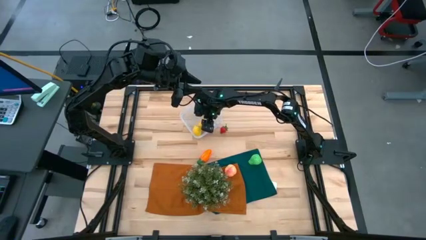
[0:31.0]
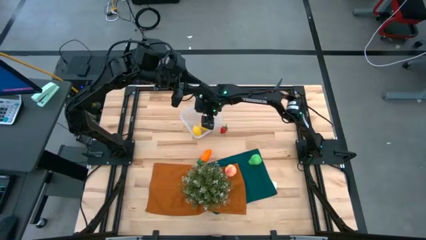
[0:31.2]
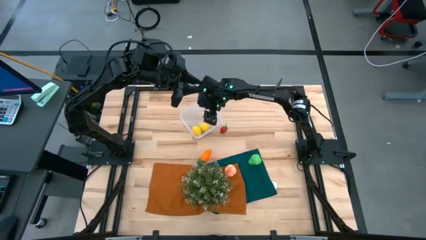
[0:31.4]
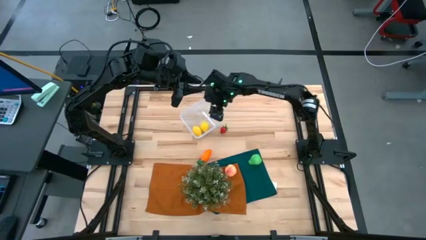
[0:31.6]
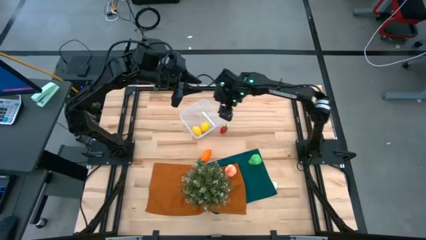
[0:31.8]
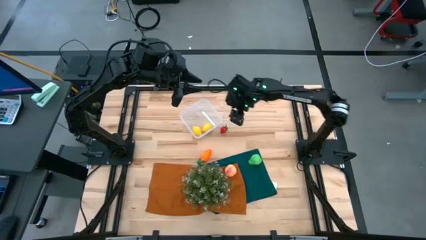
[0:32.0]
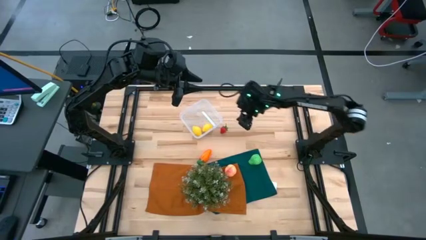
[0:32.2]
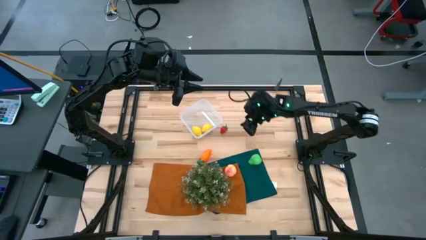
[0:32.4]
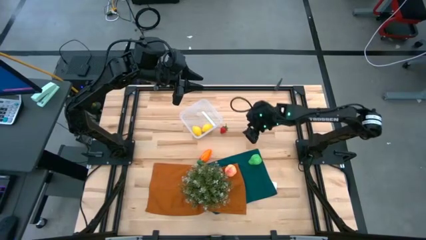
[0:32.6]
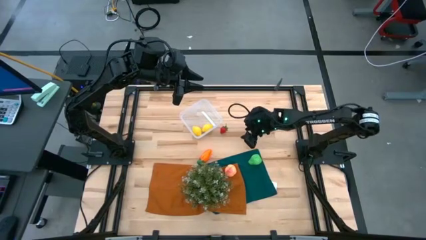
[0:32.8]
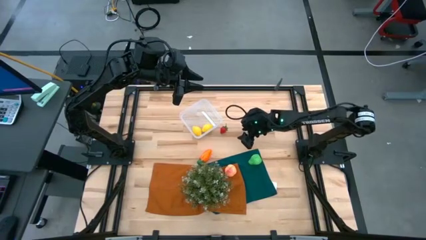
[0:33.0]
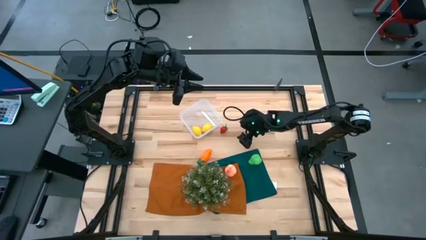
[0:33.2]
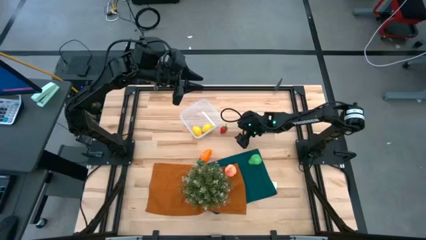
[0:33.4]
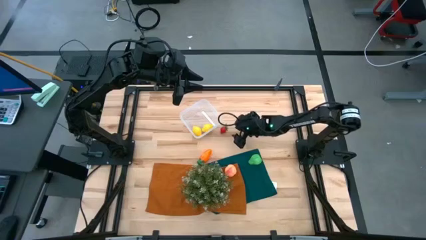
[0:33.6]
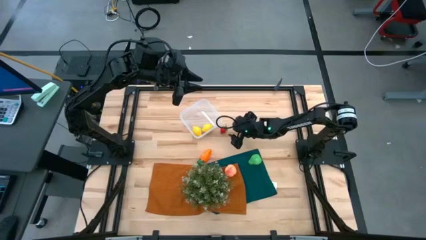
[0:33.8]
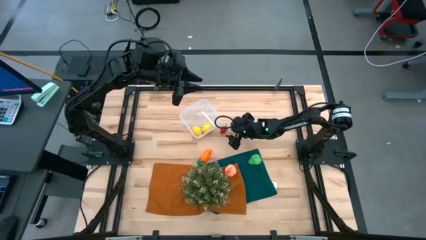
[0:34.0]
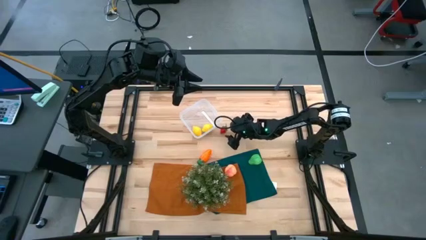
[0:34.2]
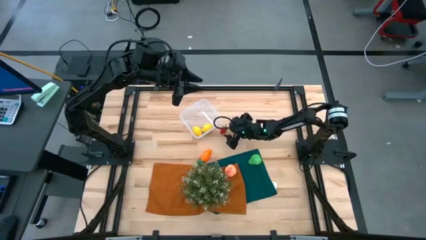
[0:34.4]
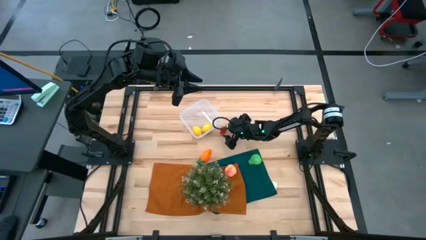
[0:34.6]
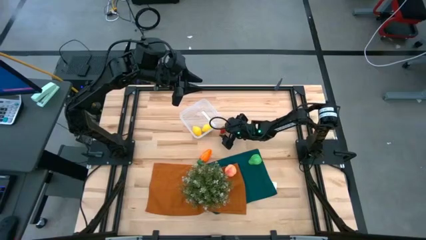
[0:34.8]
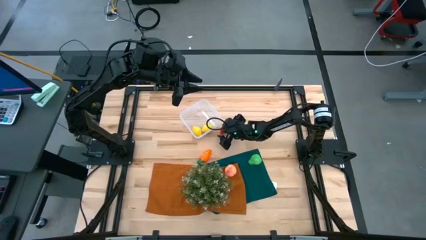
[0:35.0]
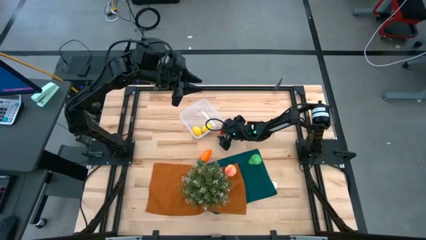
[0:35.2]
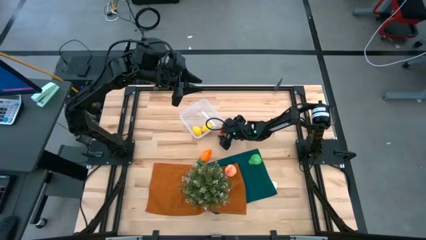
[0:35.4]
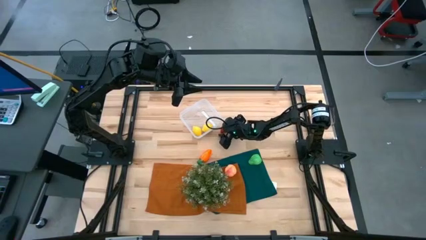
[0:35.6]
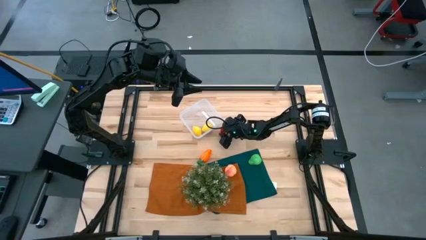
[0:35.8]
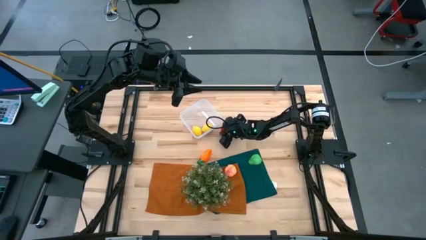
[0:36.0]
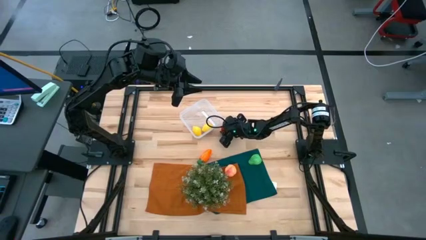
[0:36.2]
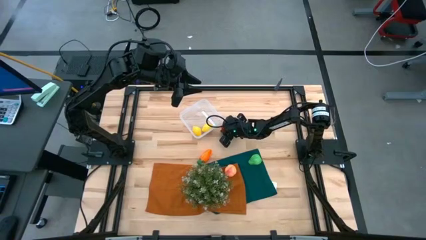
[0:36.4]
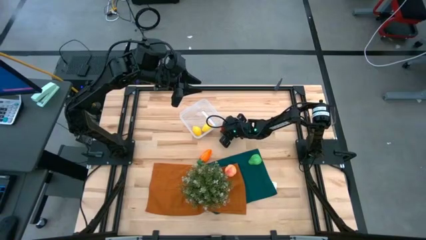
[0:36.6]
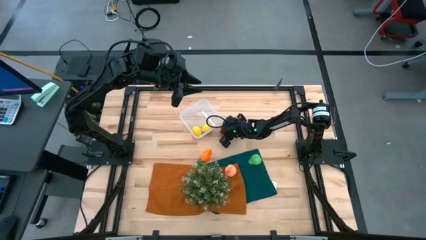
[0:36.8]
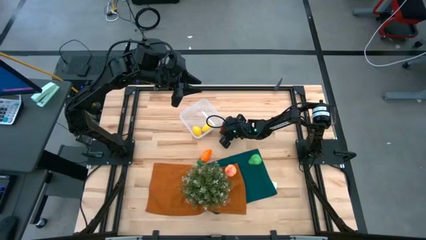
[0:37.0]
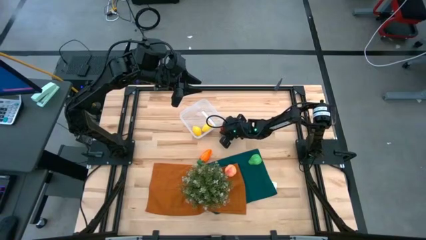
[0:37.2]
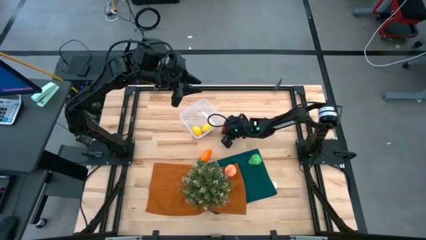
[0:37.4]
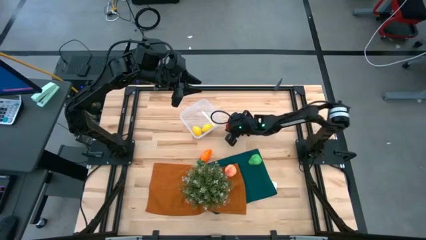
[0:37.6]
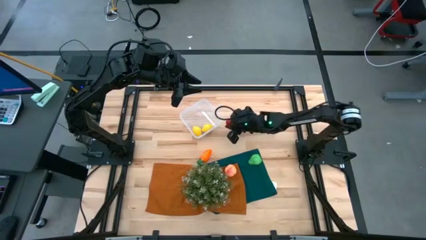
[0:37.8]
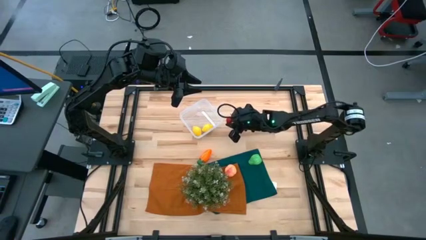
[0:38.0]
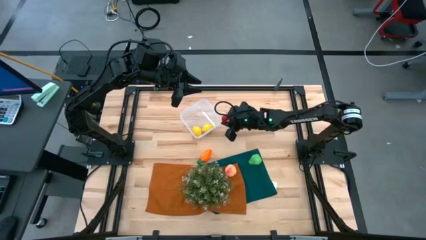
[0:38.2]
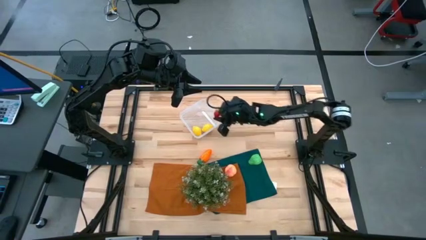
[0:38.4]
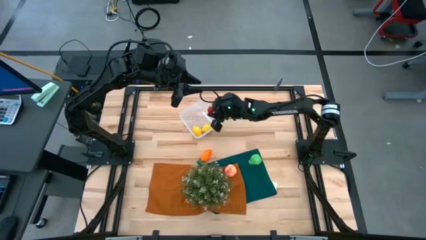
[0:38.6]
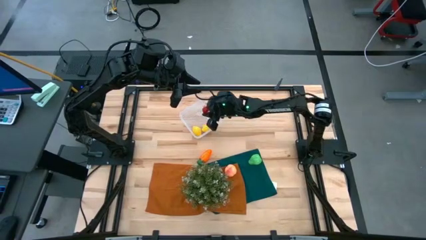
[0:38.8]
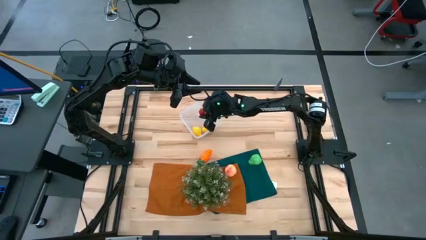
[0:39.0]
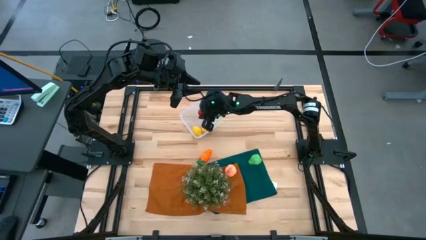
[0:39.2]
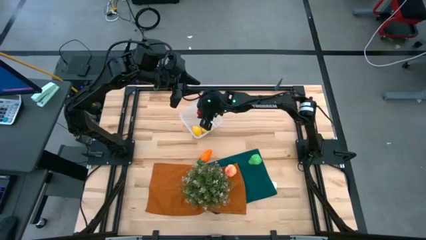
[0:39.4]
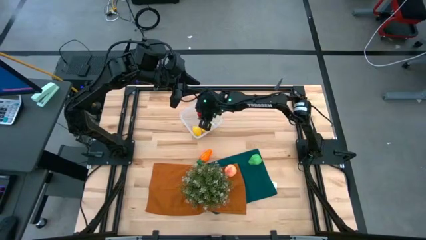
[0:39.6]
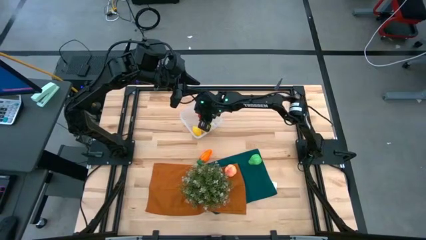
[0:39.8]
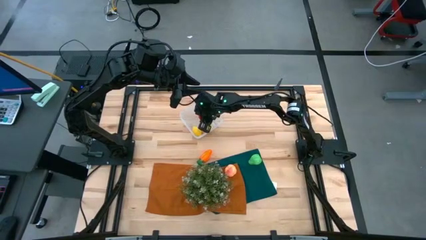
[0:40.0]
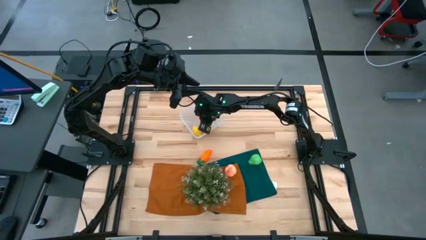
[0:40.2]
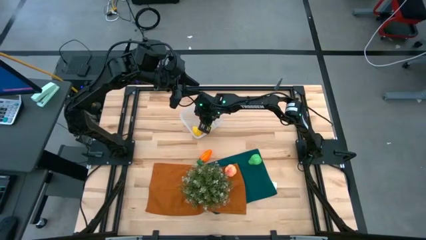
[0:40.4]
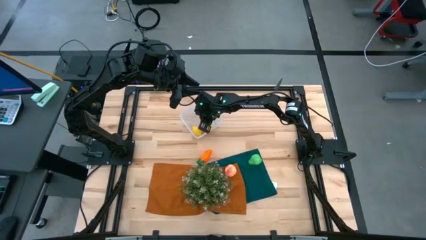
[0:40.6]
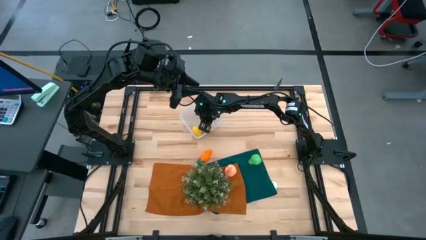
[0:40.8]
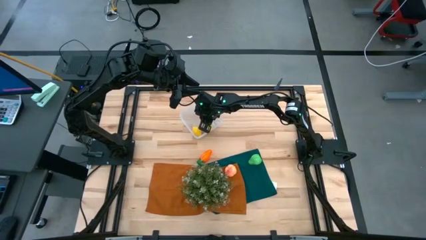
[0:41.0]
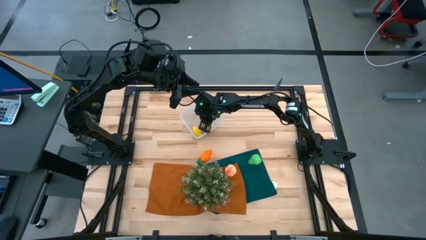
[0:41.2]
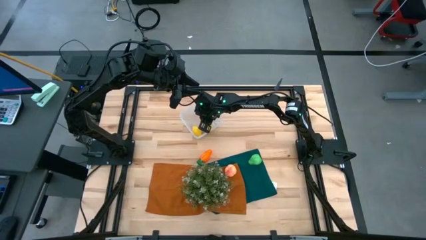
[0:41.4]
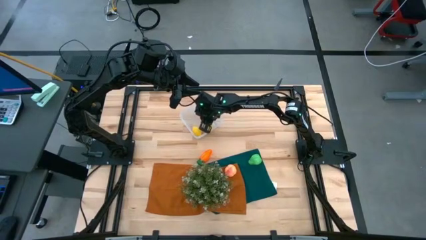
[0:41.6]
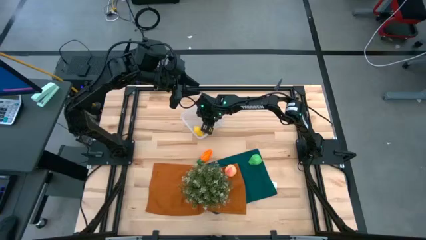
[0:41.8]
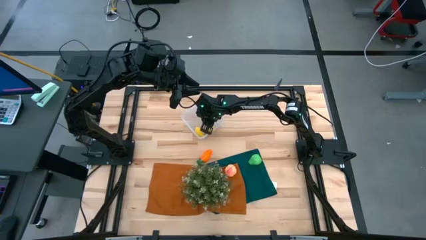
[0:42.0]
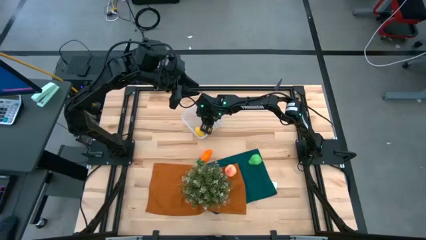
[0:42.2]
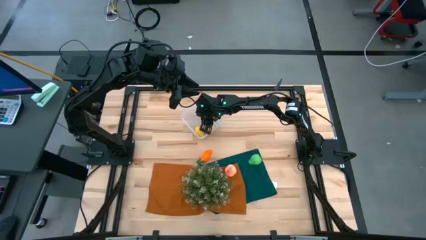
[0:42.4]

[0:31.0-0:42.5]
Task: Pick and placing Produce into tupperware
Put the strawberry into the transparent container
